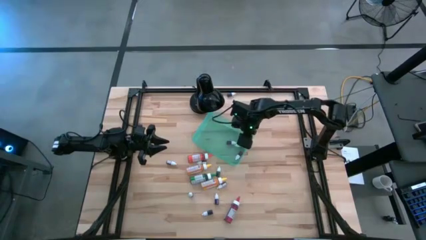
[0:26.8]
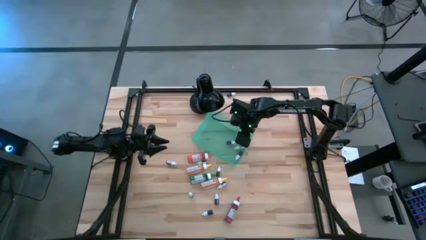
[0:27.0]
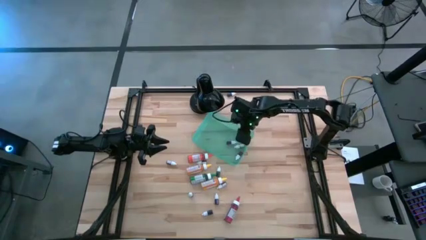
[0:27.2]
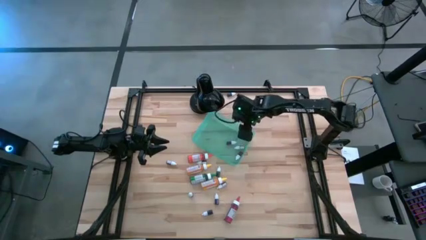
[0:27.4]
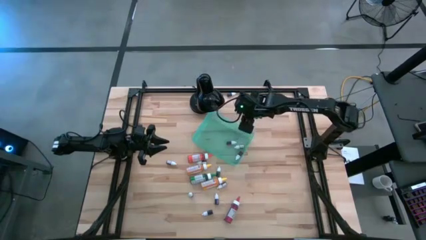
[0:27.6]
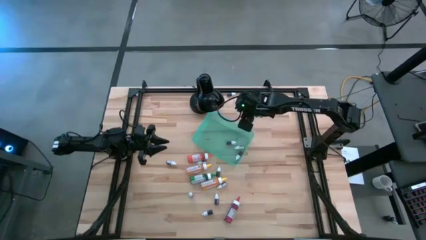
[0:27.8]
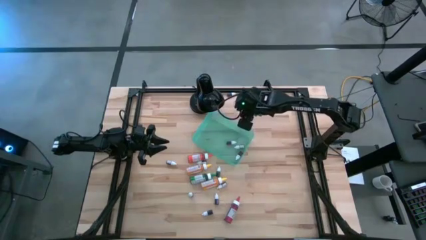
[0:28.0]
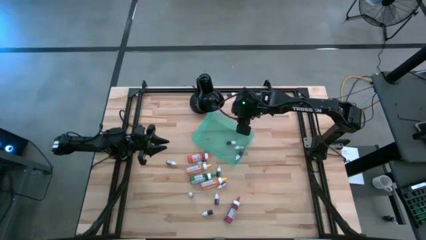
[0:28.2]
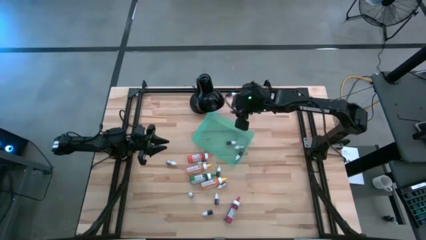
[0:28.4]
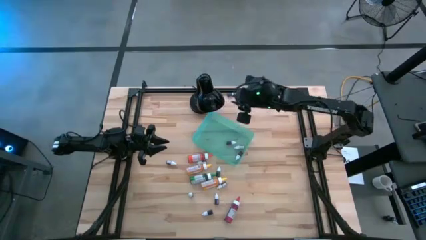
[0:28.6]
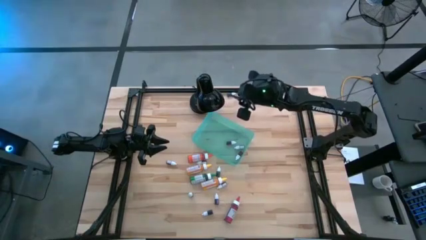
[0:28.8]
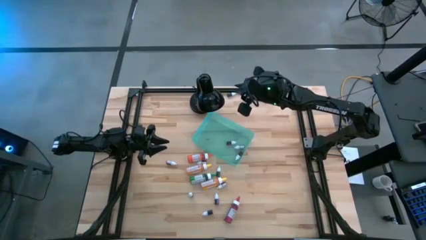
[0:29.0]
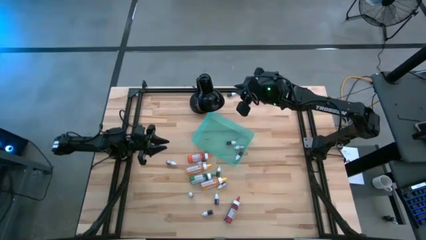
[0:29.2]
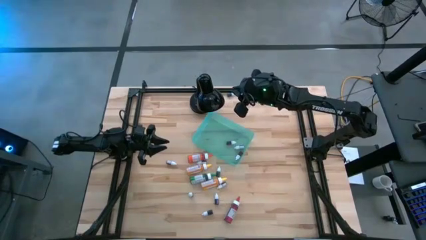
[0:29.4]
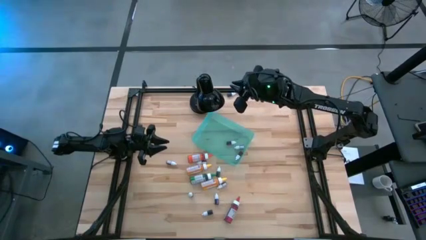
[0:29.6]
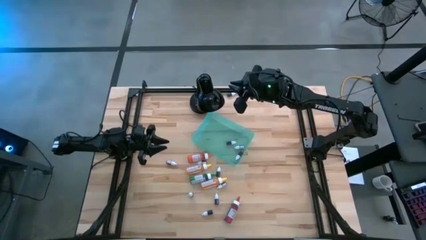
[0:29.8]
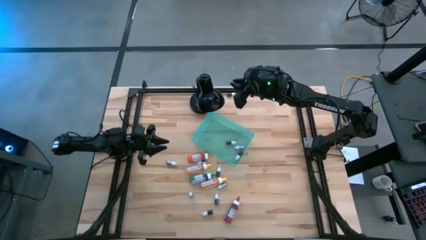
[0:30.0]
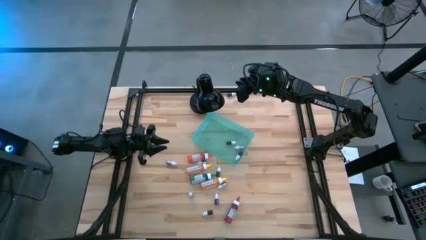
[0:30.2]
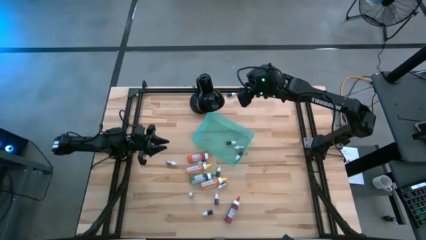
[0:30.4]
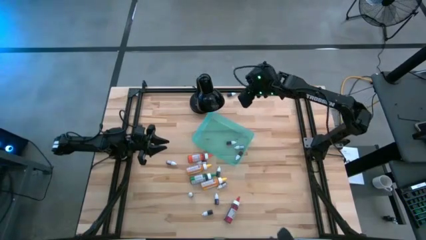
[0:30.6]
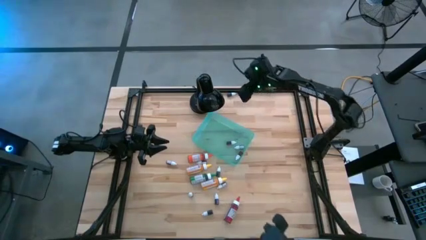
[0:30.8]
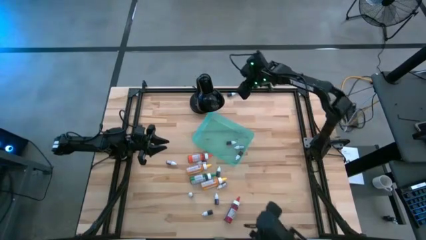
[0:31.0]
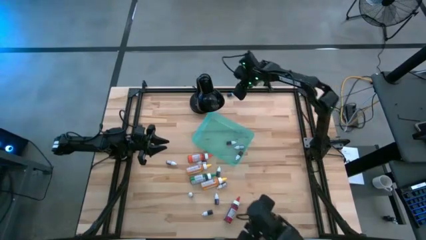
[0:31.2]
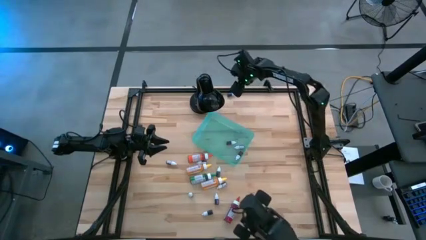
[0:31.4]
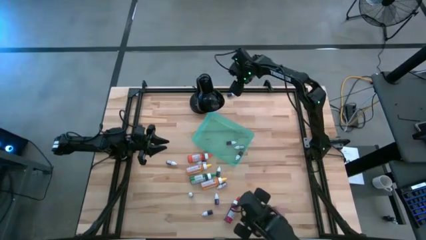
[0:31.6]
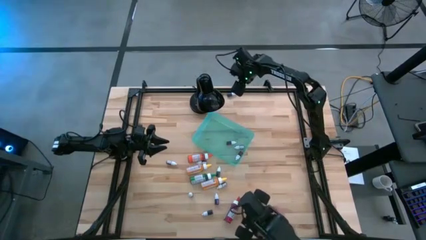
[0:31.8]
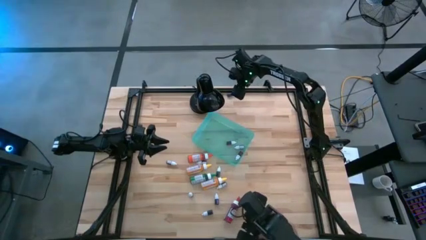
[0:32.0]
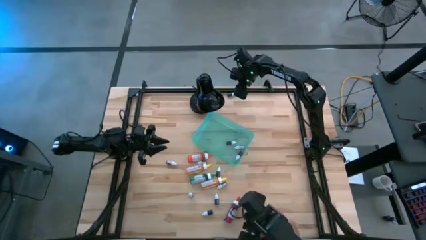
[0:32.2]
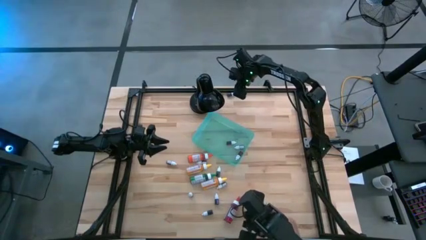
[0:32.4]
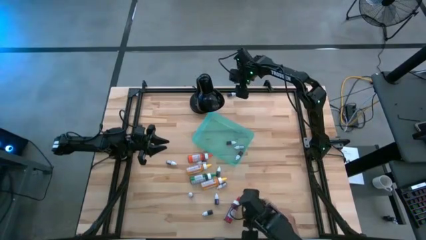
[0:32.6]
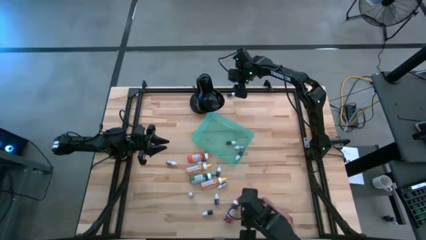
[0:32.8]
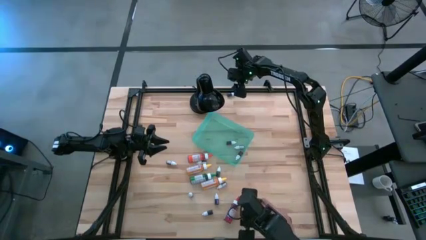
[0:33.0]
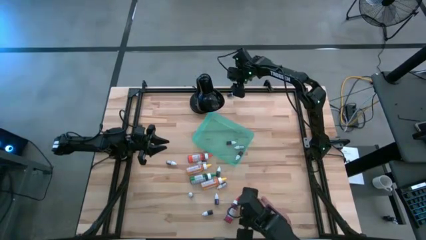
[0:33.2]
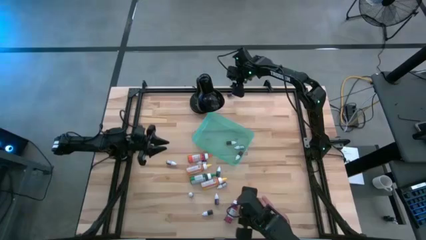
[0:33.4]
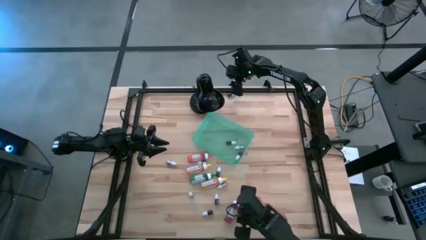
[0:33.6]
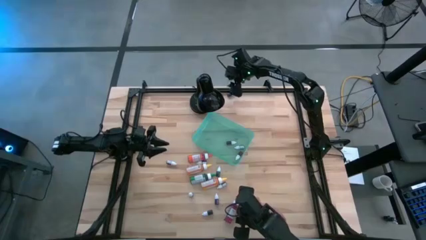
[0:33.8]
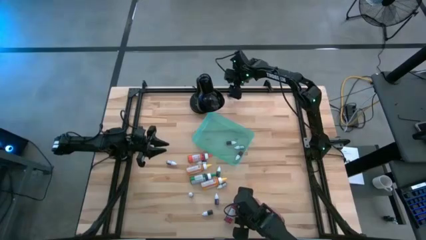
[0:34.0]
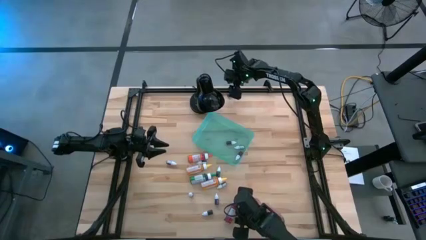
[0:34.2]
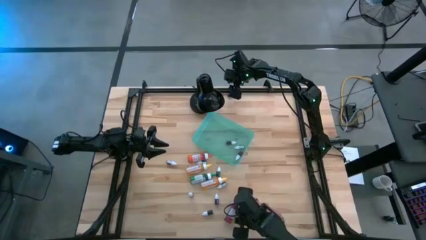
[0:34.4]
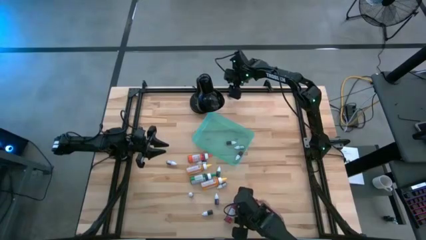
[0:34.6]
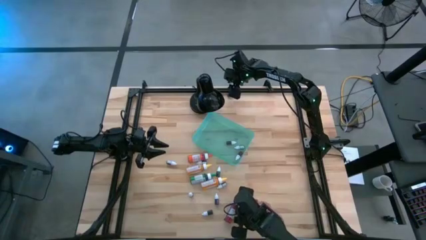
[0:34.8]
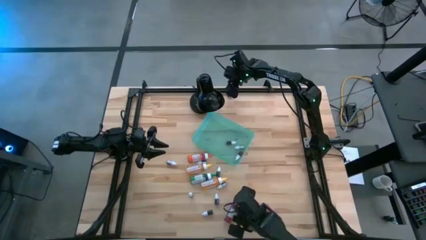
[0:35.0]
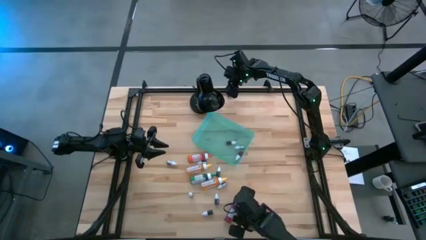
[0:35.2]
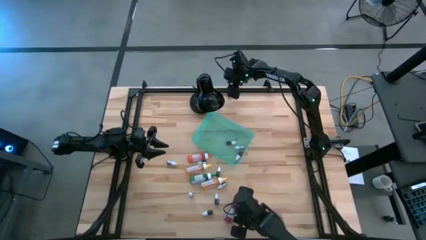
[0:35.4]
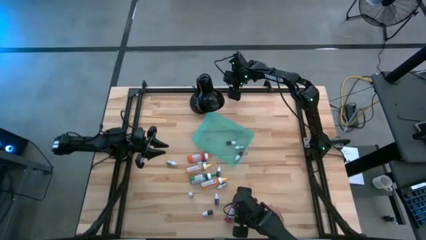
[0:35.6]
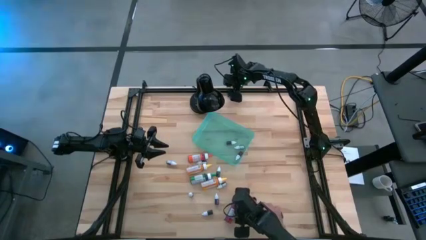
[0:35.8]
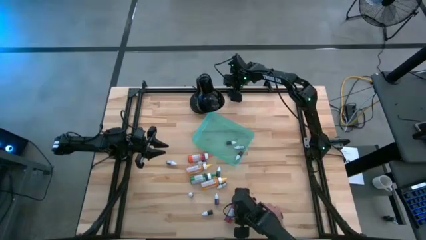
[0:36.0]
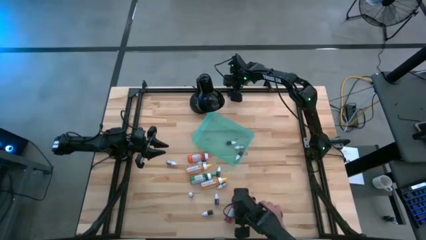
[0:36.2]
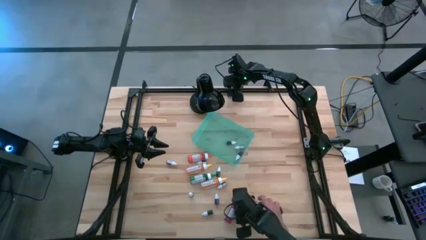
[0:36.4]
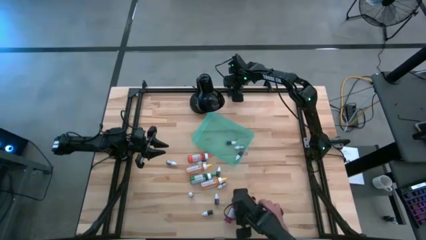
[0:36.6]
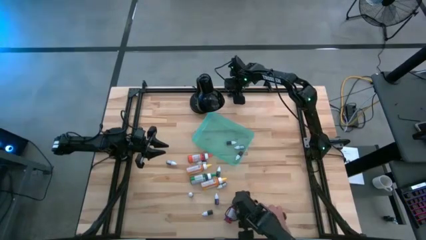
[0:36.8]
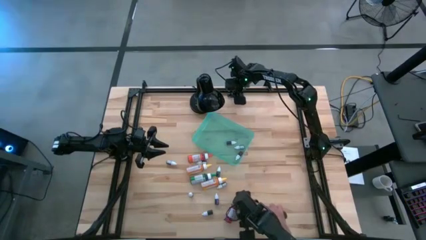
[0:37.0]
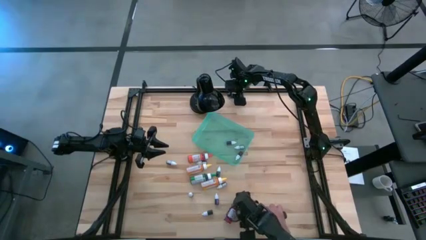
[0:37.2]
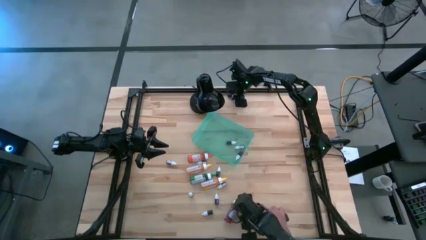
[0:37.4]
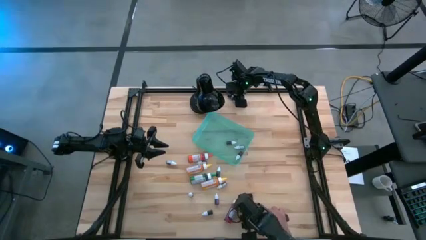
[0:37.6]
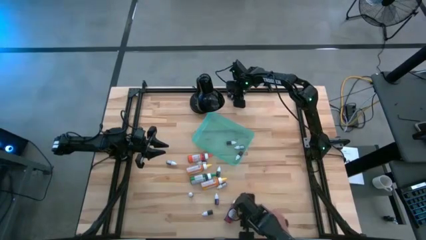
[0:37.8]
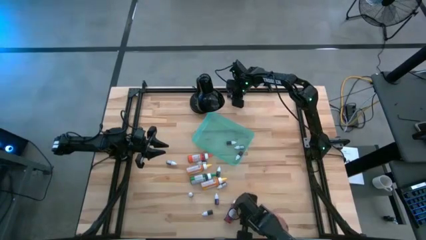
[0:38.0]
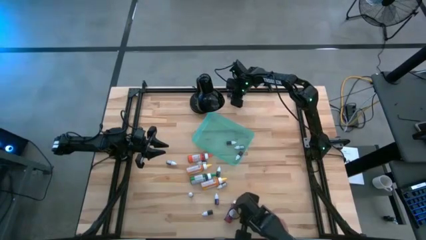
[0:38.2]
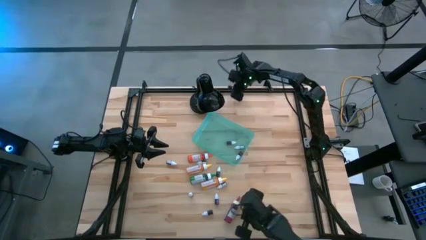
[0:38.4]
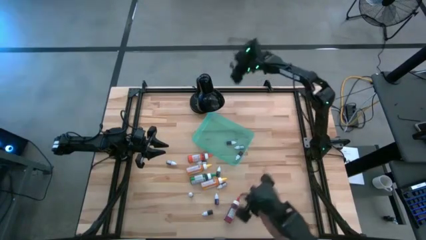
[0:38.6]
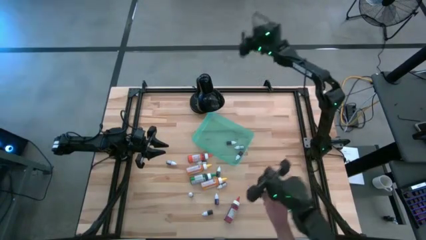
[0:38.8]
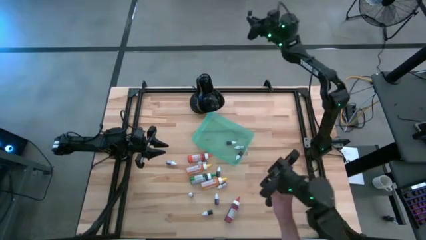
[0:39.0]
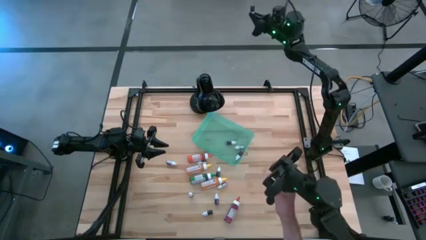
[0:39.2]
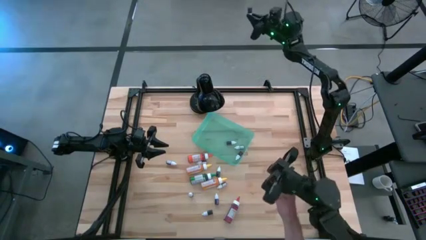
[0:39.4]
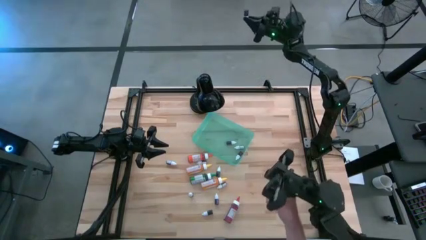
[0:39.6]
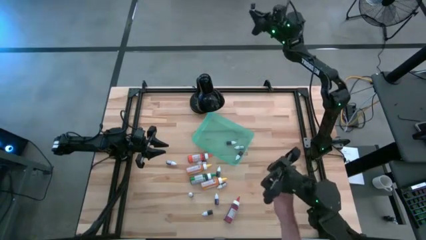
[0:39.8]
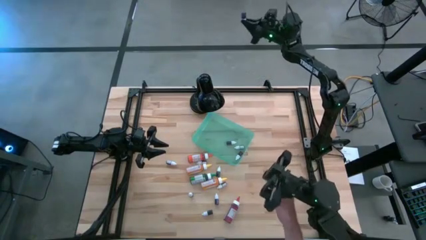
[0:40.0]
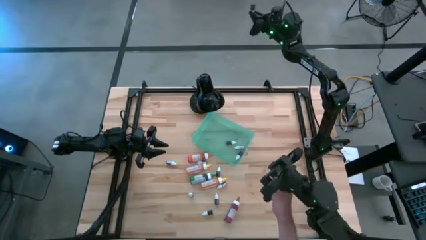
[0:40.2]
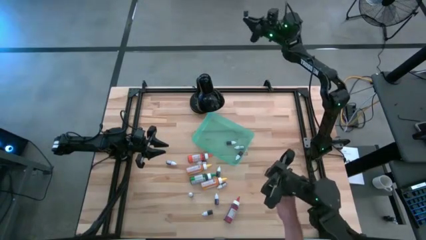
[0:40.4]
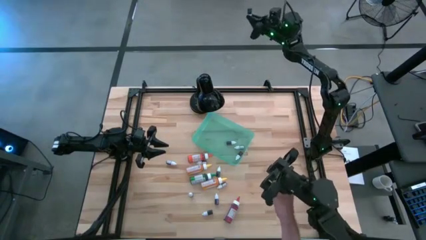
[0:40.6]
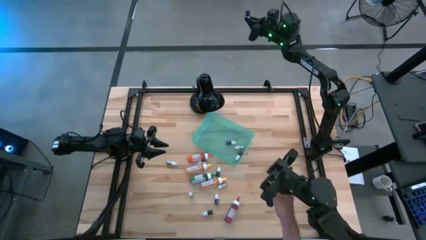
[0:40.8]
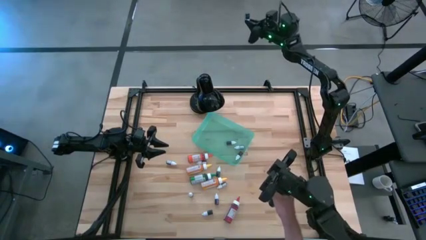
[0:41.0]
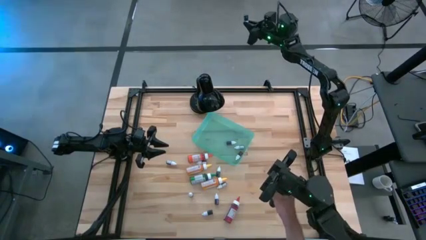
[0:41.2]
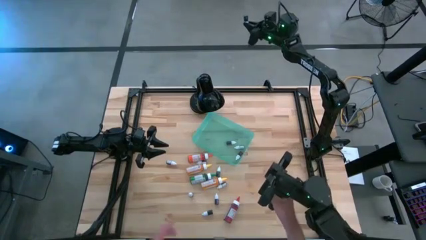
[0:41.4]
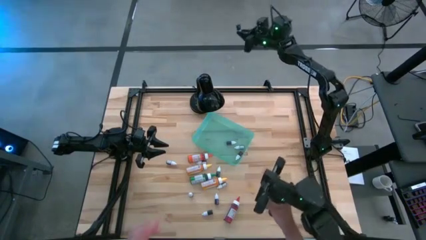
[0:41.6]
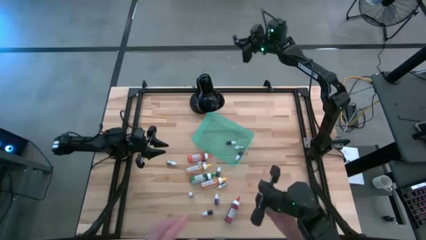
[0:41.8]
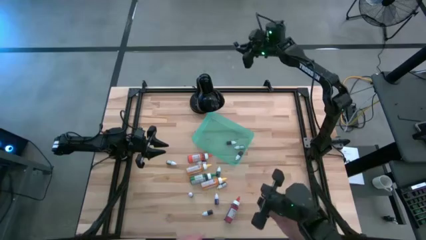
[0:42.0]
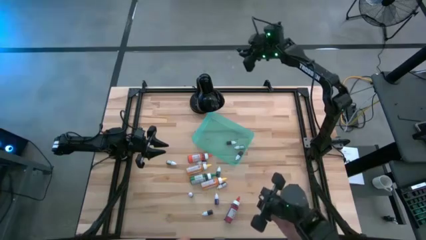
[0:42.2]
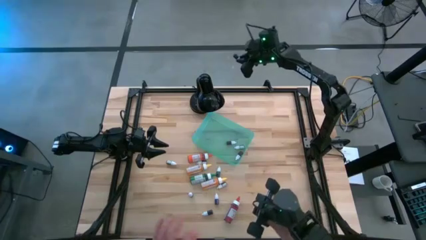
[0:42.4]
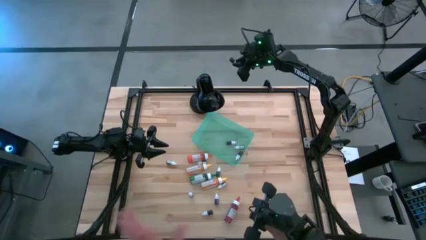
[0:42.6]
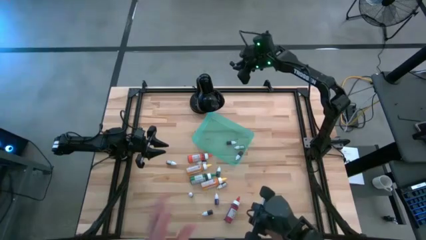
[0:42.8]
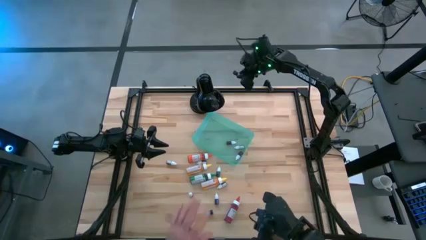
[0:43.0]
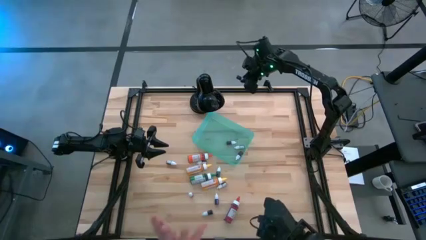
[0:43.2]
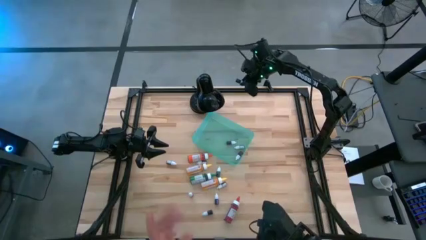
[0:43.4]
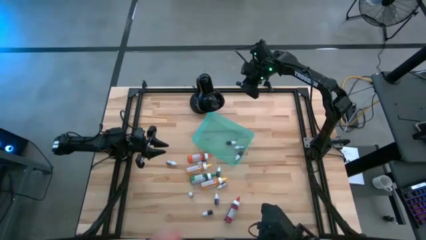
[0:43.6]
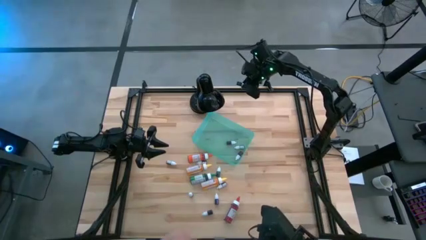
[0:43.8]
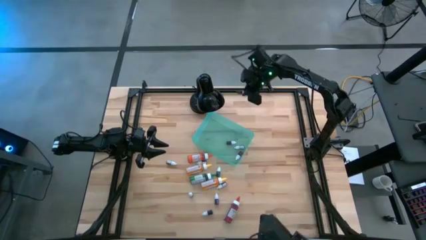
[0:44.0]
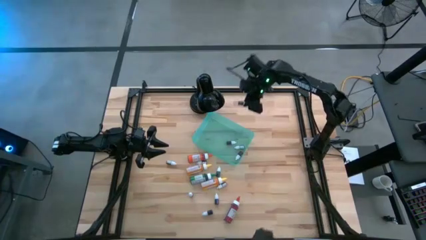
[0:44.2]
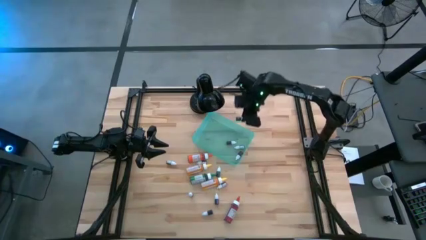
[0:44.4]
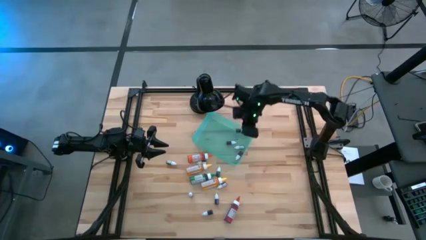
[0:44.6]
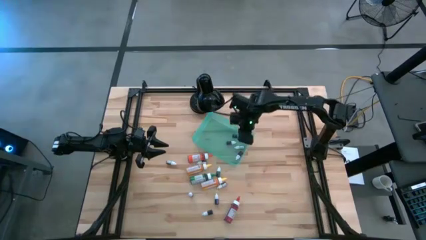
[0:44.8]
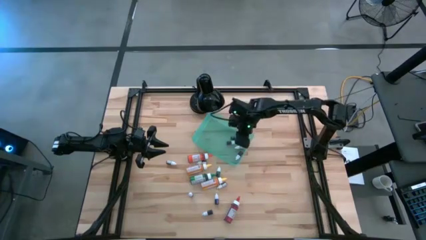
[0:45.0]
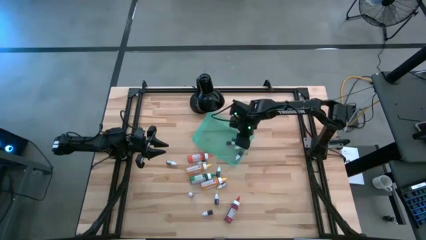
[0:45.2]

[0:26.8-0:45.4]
Task: Pick & Place food coloring
Put the small black food coloring bottle into the green bin
